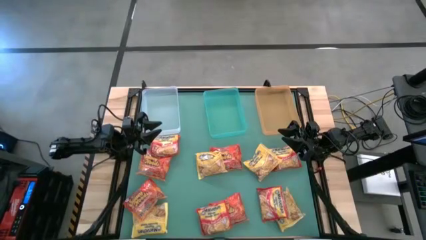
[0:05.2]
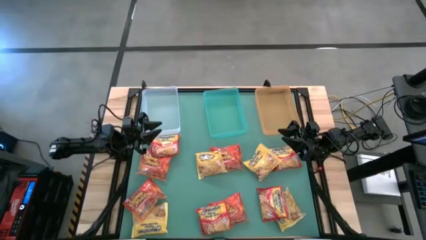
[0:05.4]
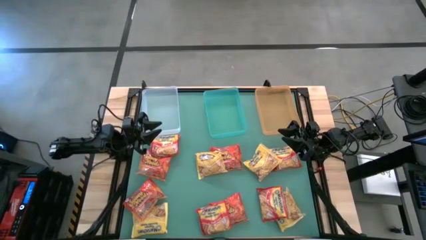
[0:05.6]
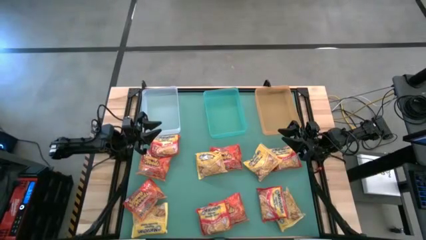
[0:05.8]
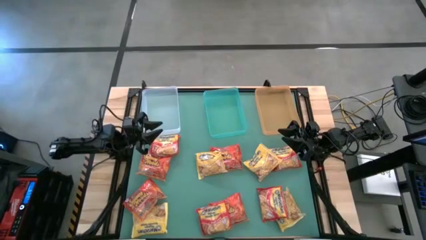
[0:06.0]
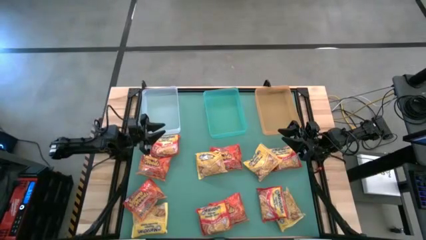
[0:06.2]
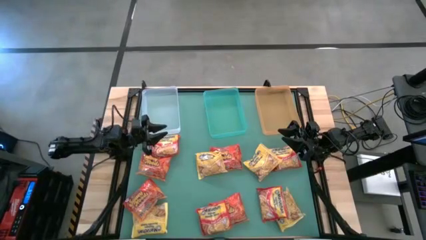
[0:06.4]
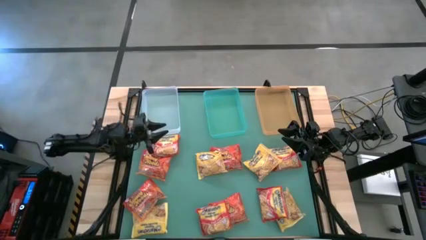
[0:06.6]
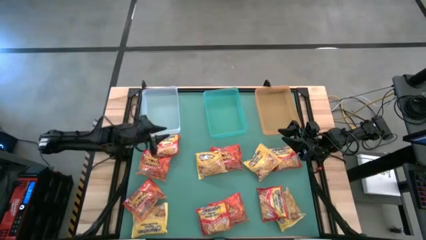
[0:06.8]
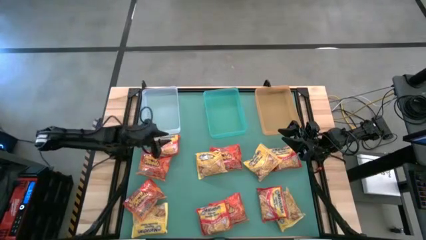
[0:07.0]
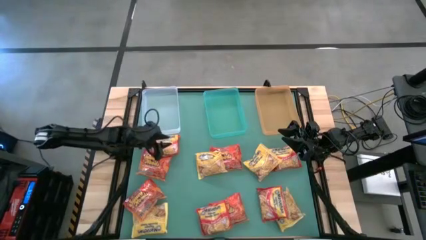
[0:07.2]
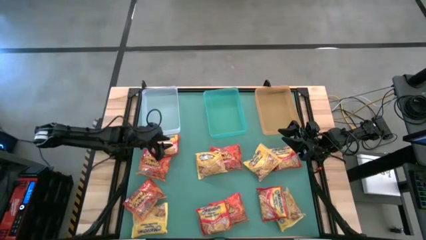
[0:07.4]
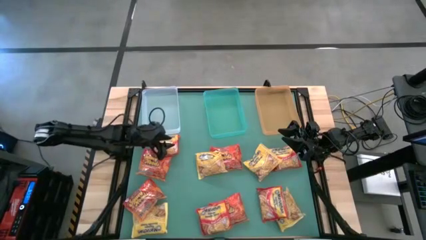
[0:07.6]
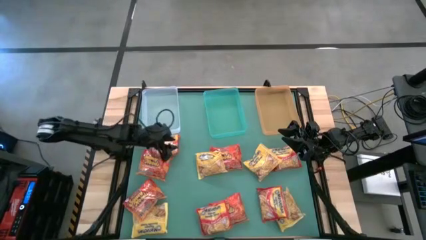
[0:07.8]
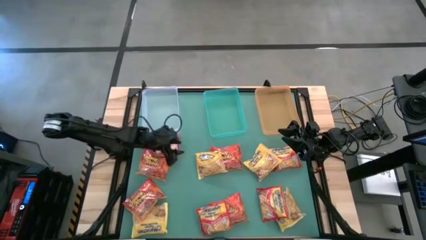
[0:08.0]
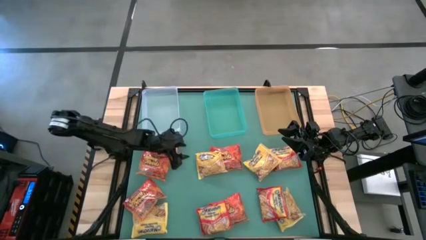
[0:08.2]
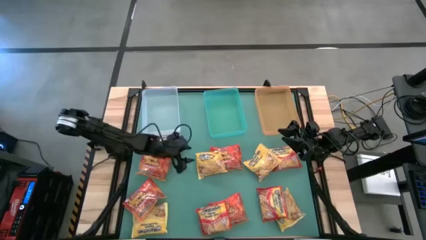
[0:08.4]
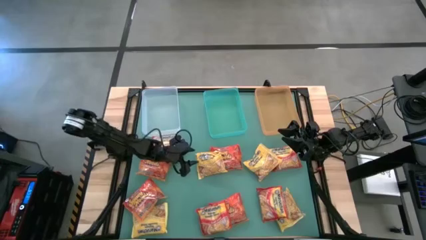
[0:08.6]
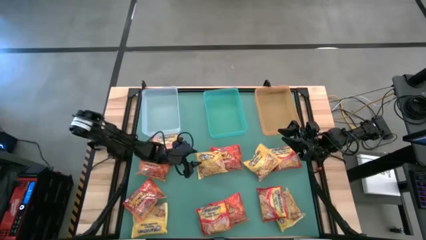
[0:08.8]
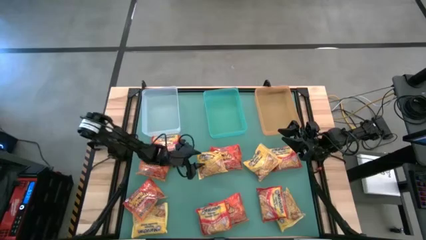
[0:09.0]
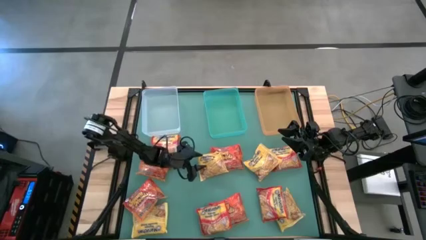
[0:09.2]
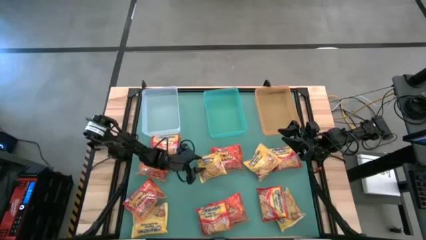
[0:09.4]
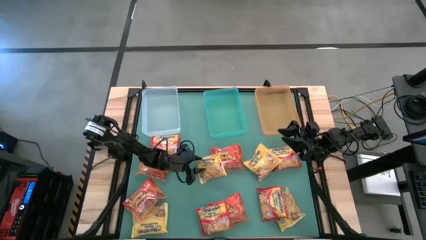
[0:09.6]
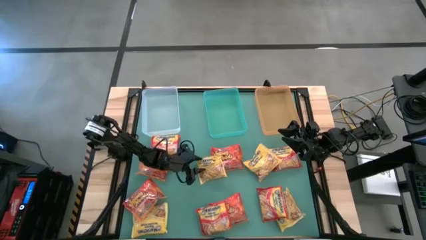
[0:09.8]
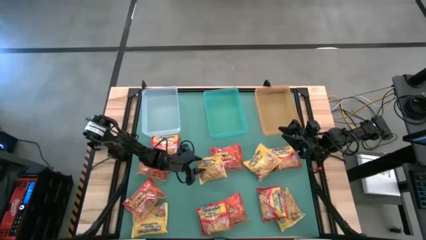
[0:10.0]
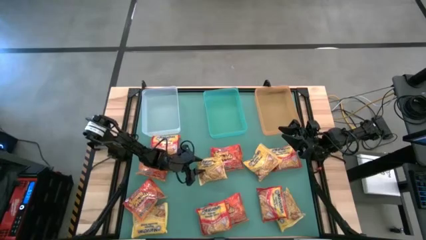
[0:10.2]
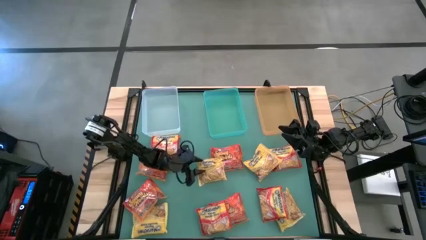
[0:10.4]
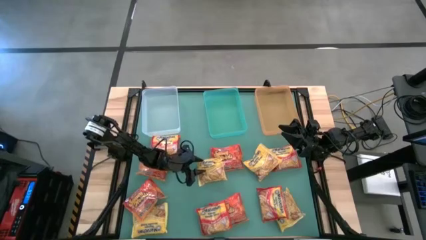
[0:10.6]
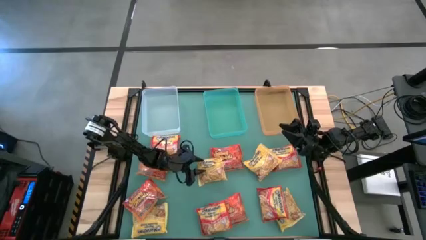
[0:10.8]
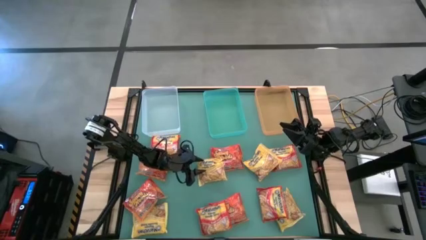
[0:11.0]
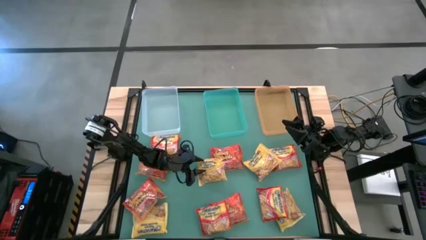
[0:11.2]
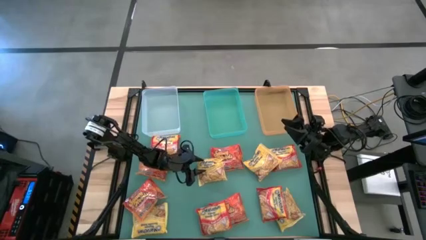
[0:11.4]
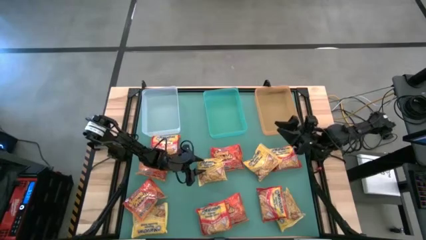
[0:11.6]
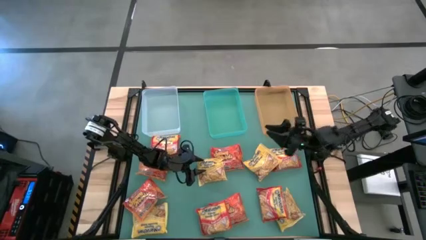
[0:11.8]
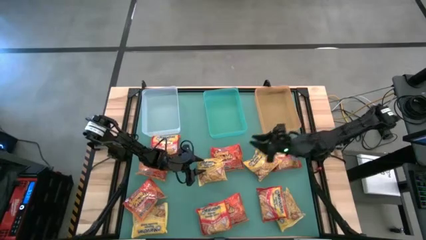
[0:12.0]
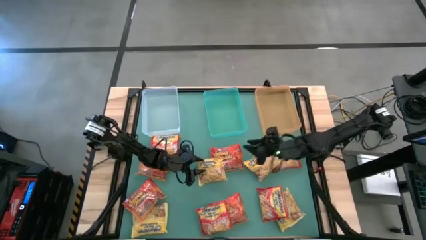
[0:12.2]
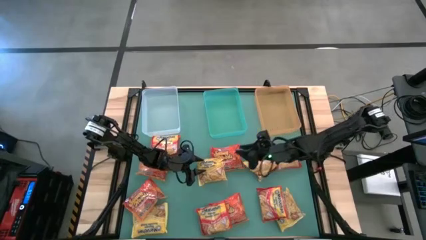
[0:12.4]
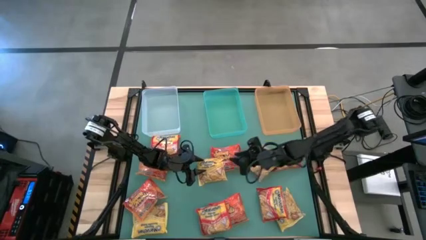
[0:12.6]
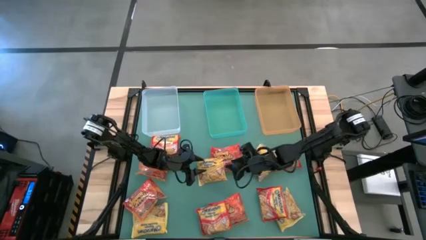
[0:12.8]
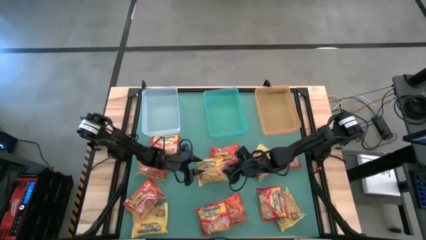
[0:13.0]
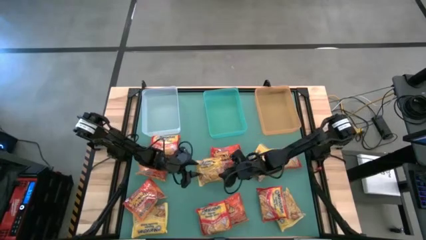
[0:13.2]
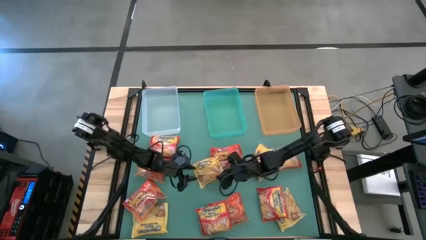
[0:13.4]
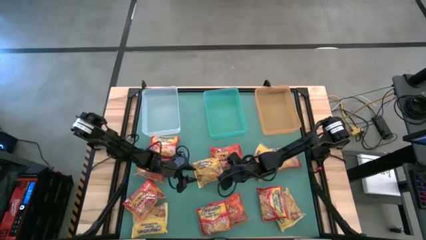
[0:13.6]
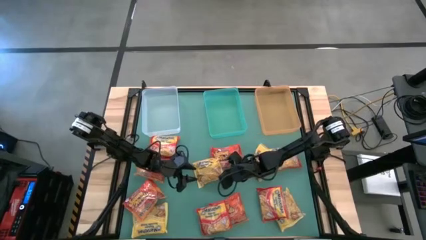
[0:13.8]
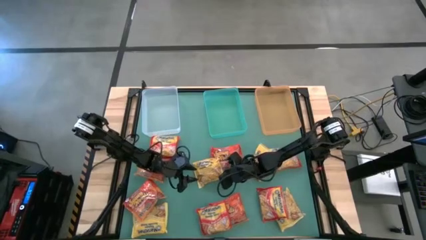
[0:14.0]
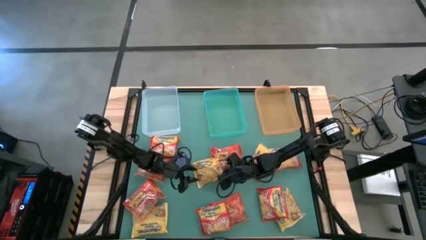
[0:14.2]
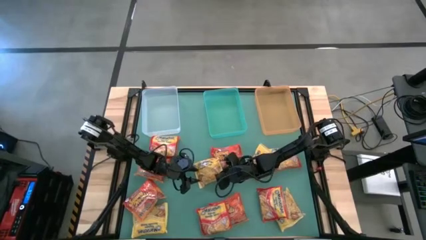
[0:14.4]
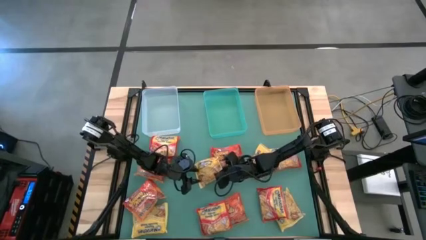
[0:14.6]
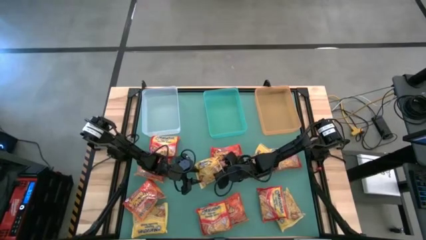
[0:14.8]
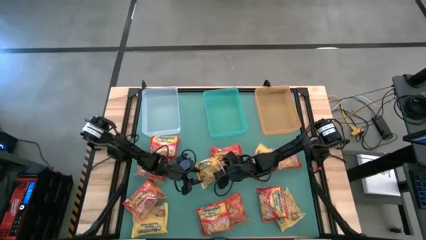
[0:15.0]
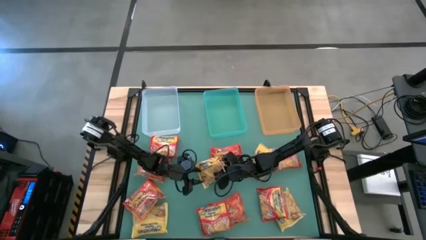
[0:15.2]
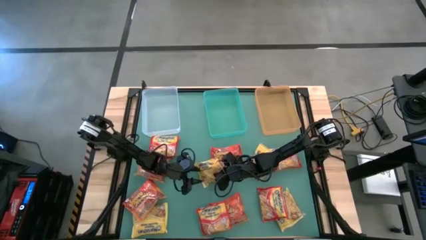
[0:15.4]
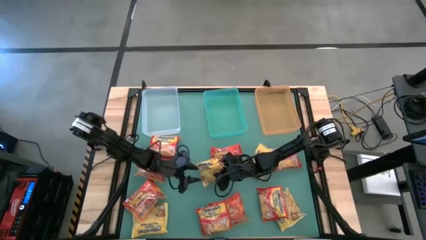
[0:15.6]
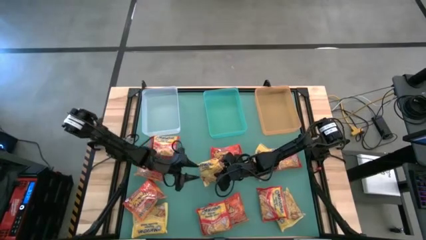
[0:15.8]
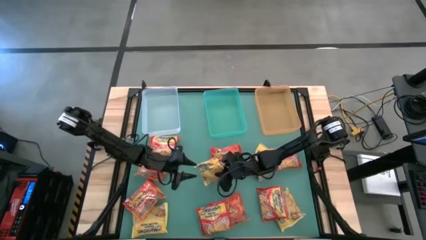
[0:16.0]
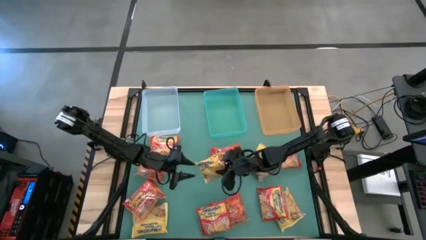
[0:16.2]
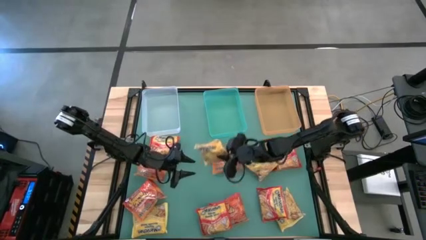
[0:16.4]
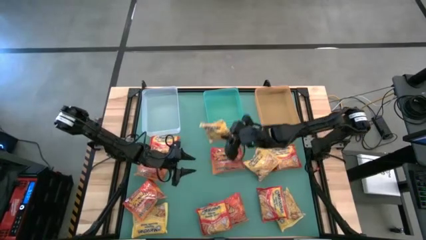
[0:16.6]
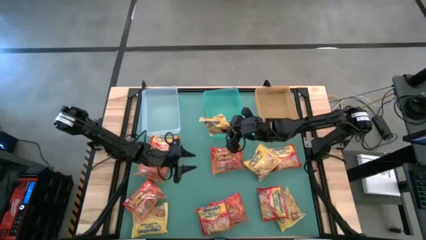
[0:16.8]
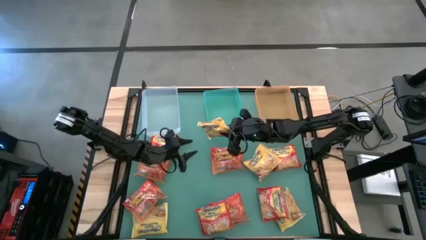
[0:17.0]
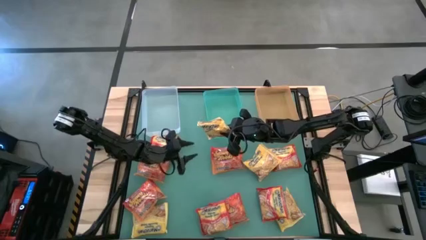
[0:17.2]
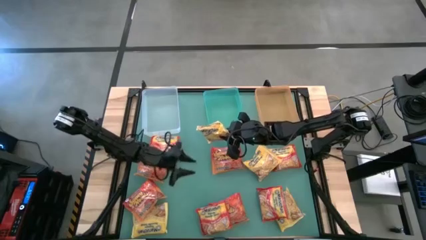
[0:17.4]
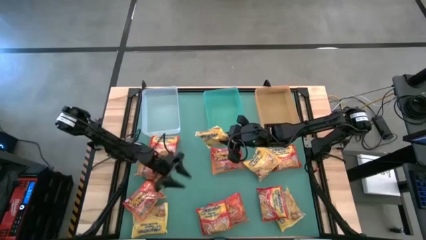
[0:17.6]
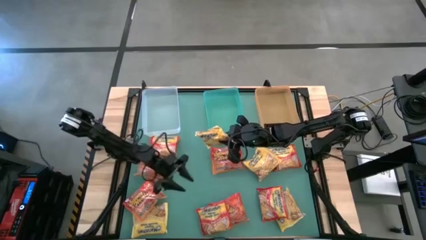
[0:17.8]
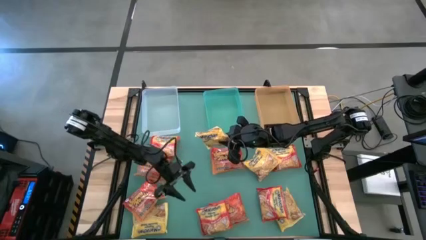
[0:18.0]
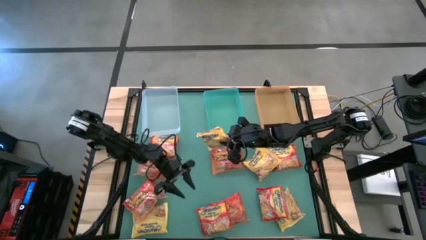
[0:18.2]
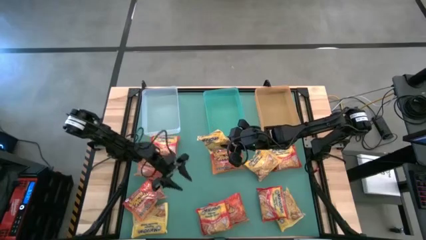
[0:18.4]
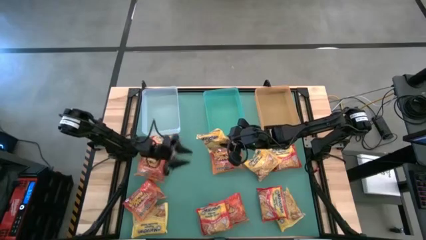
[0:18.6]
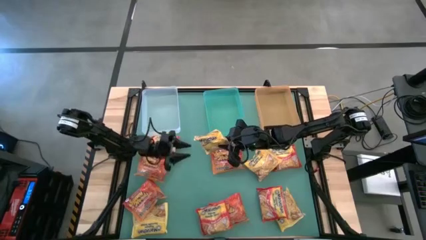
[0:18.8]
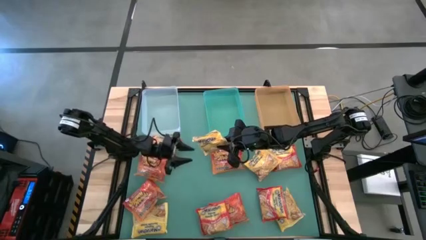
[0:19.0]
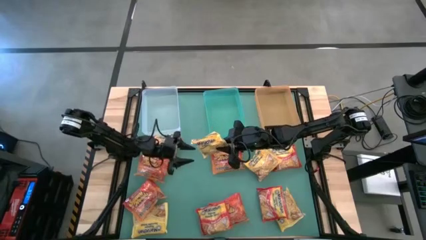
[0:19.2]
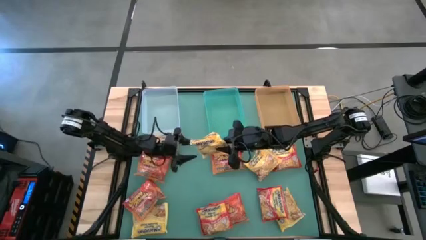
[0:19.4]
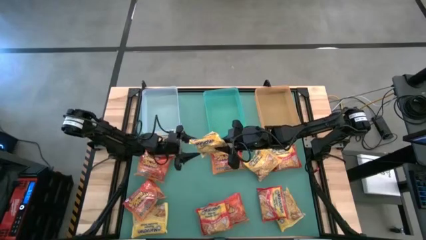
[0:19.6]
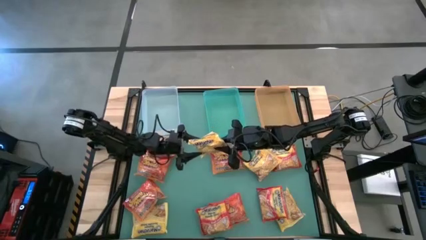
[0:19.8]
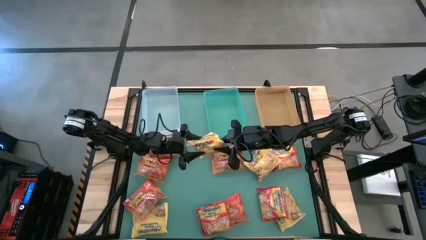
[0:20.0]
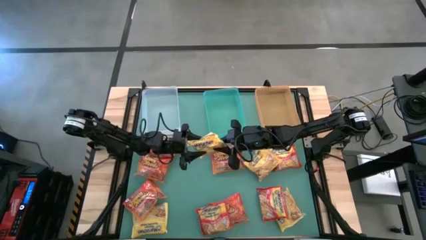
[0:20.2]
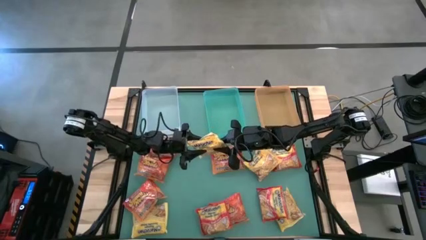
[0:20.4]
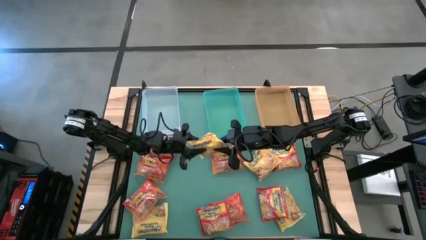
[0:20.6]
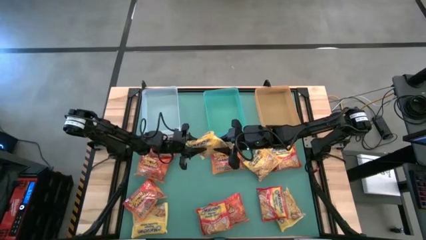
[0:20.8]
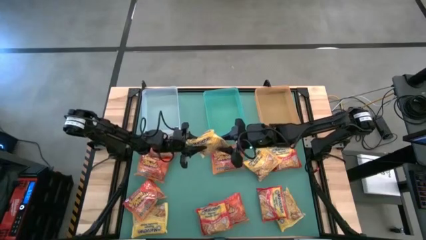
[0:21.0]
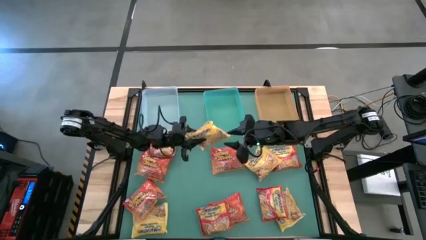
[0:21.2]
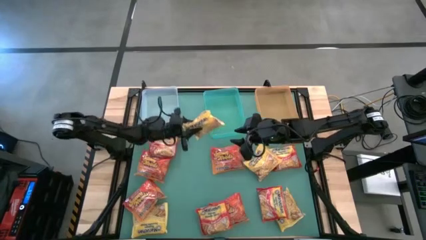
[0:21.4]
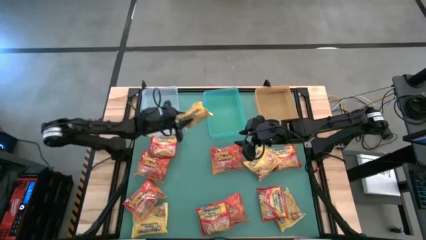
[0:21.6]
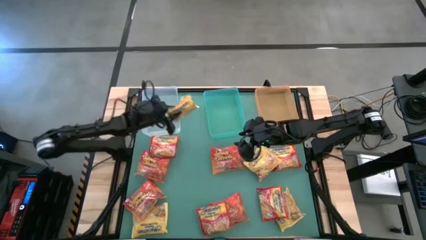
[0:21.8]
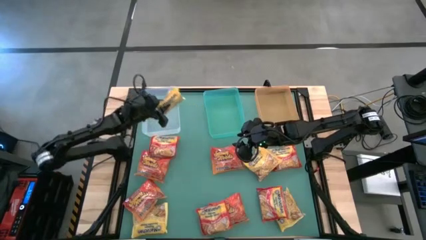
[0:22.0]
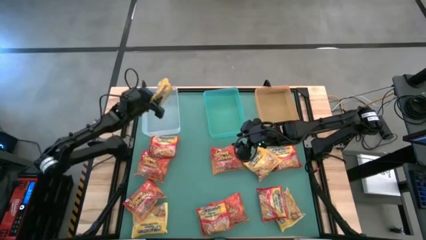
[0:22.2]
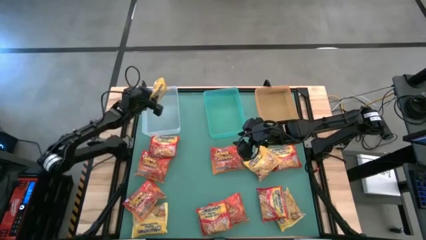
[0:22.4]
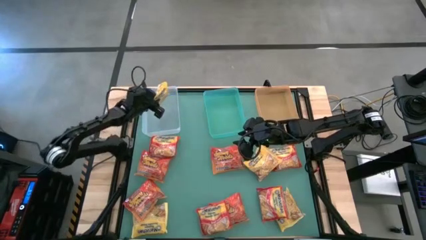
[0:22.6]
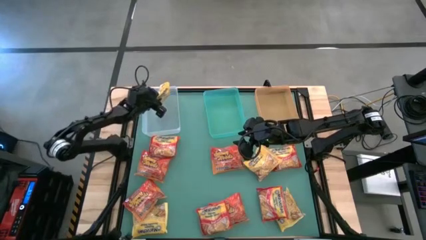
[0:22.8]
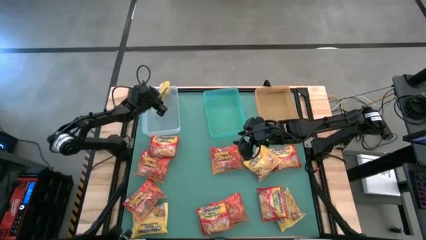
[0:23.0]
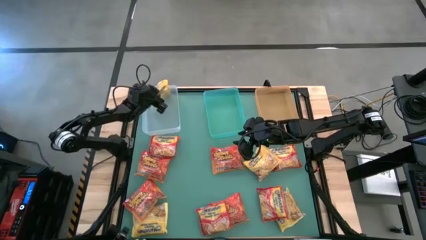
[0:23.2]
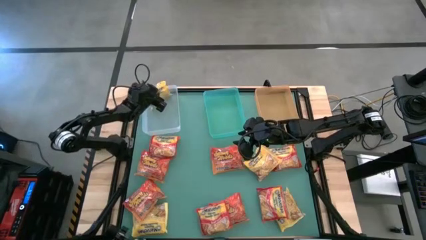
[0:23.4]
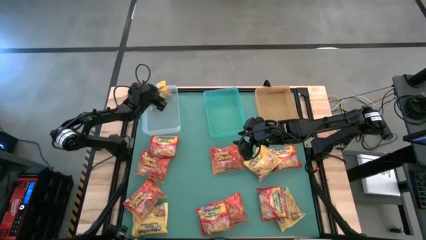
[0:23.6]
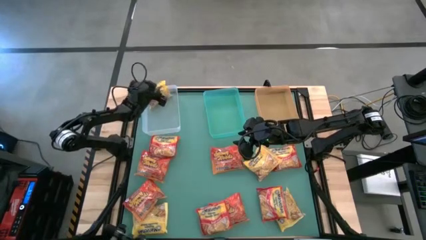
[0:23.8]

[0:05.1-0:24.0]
Task: Sort Maruchan noodles
Put the yellow noodle pack into the transparent bin
